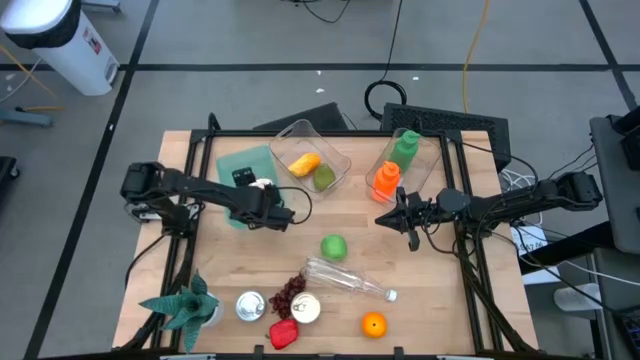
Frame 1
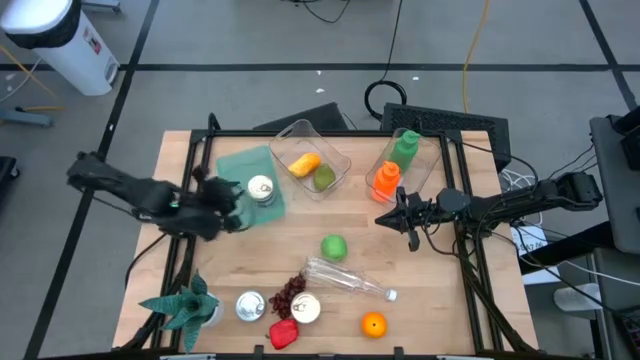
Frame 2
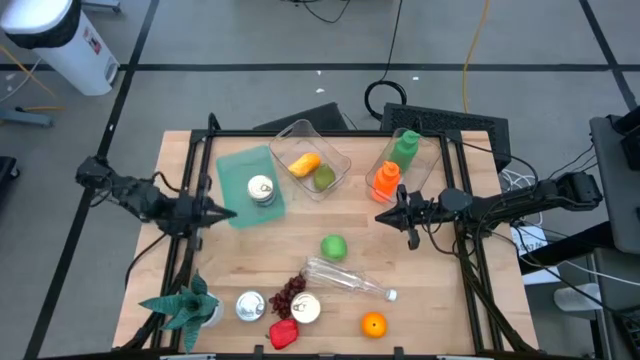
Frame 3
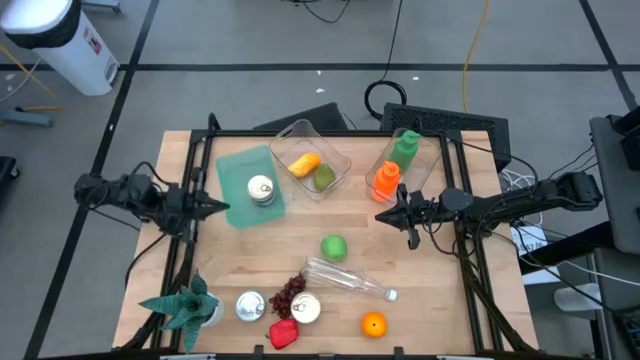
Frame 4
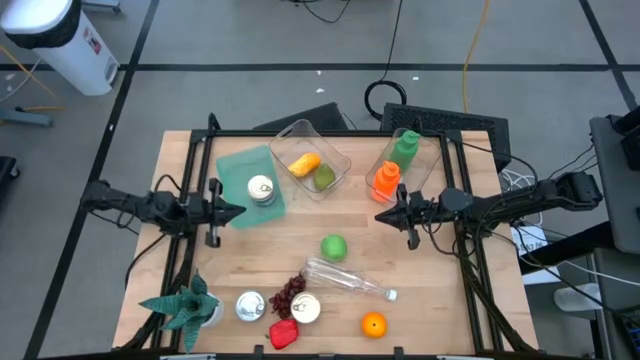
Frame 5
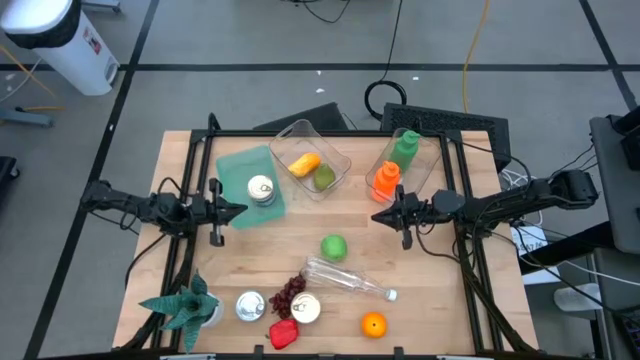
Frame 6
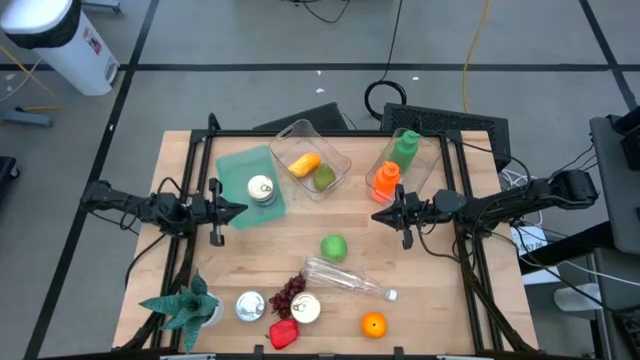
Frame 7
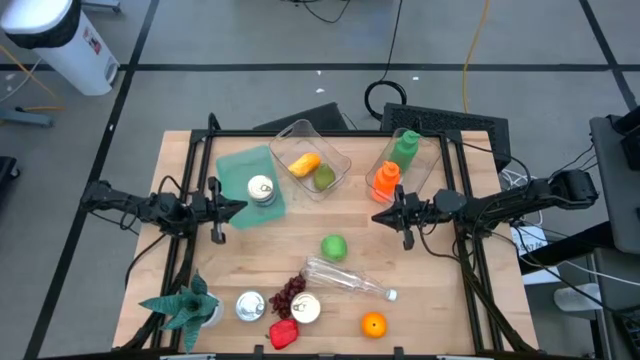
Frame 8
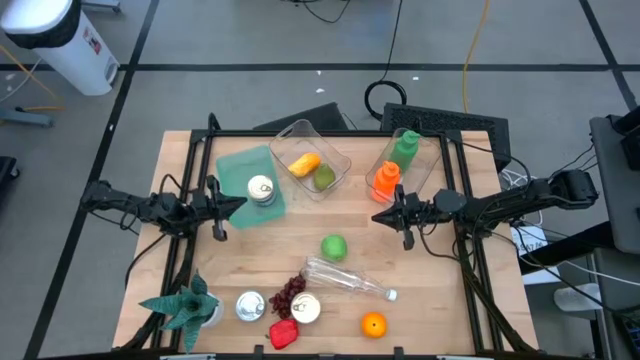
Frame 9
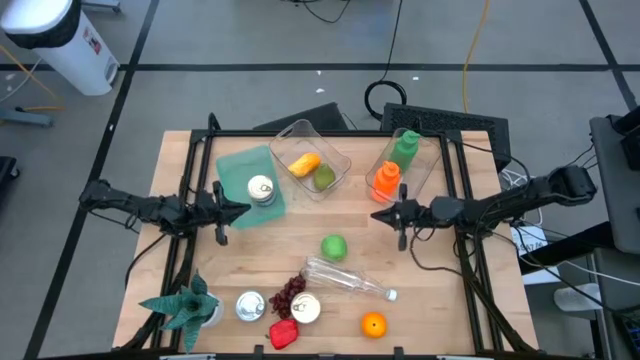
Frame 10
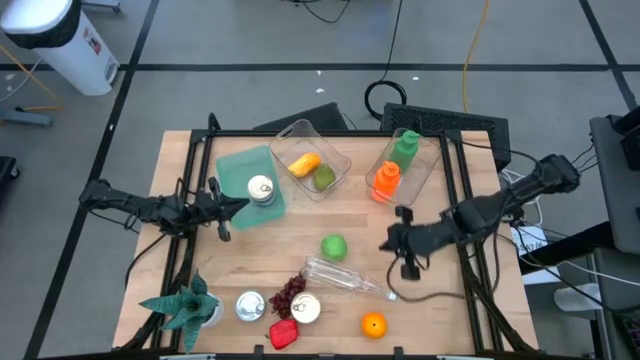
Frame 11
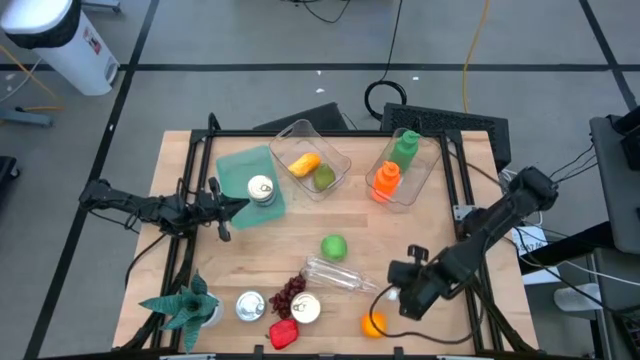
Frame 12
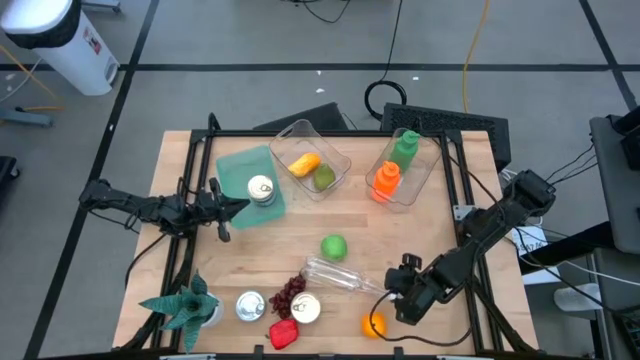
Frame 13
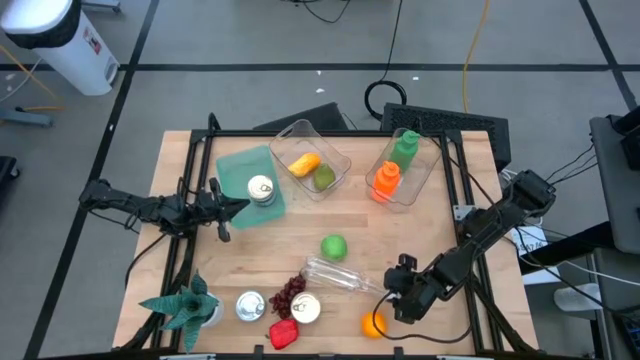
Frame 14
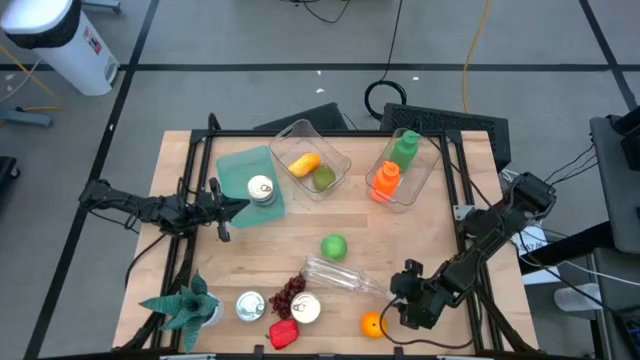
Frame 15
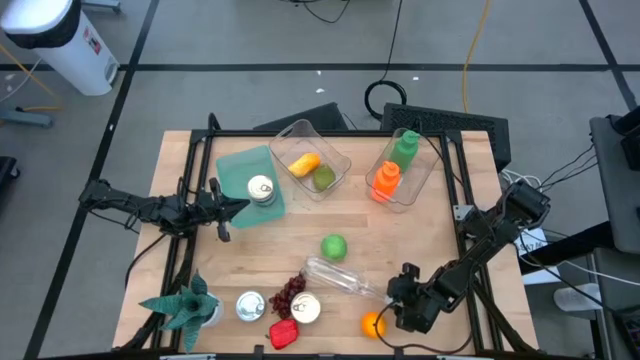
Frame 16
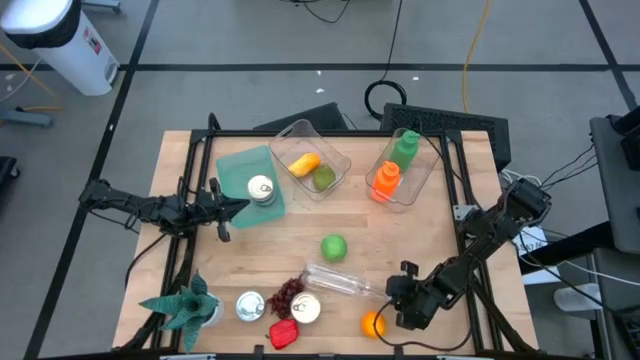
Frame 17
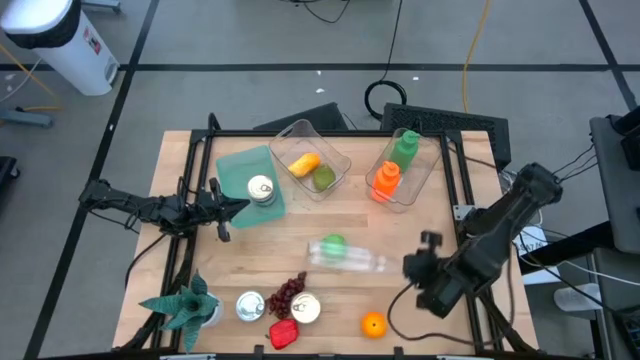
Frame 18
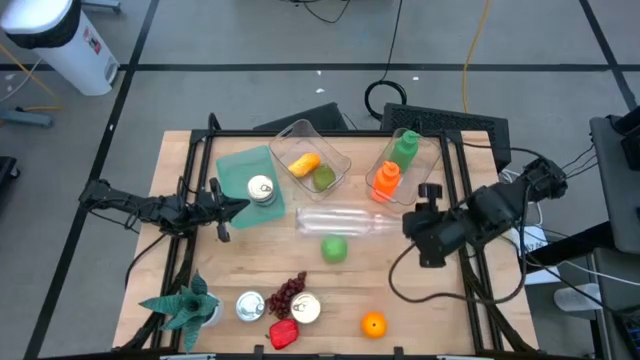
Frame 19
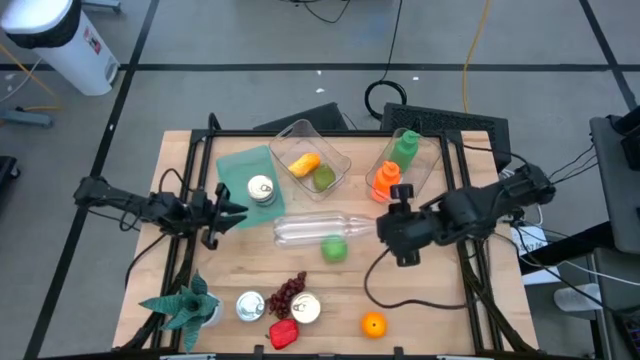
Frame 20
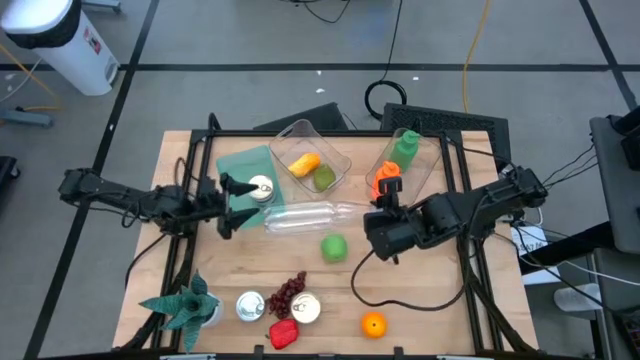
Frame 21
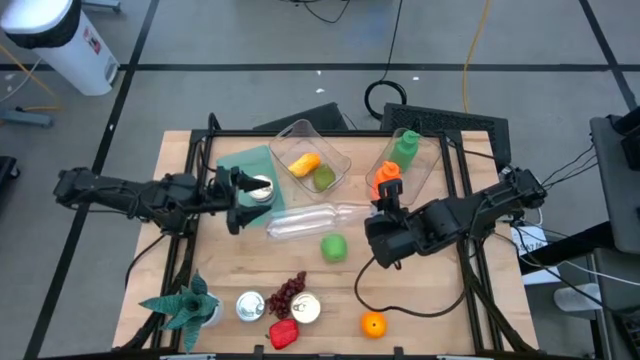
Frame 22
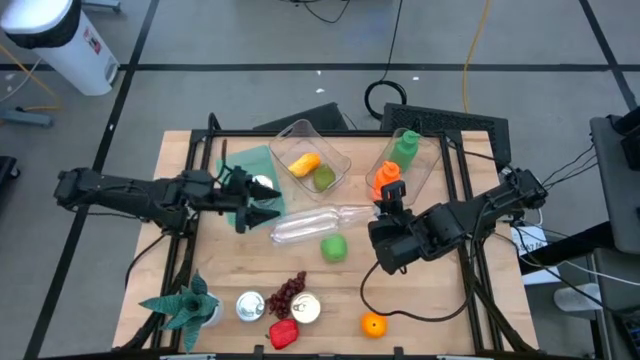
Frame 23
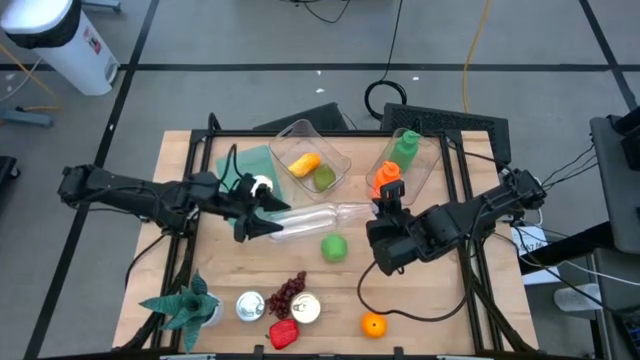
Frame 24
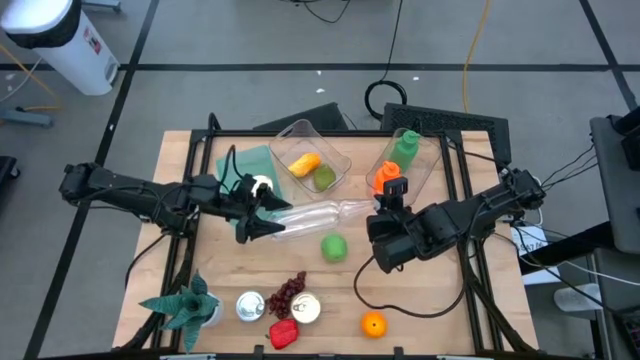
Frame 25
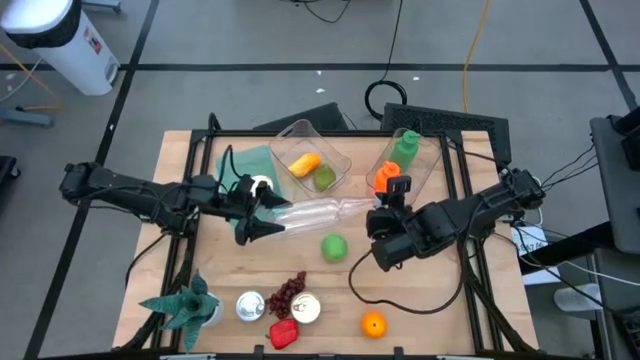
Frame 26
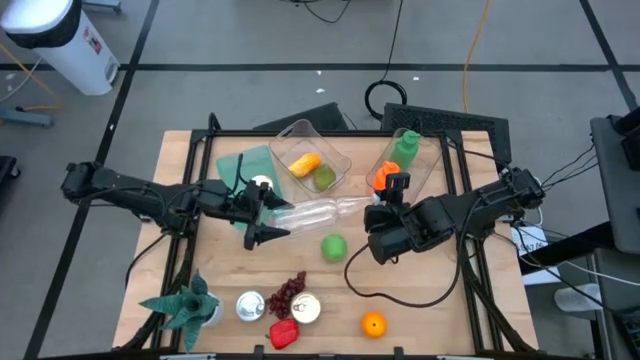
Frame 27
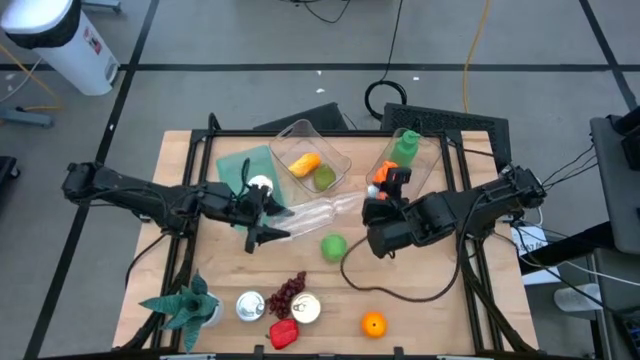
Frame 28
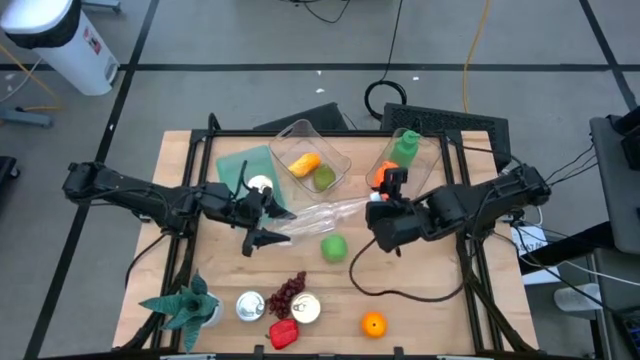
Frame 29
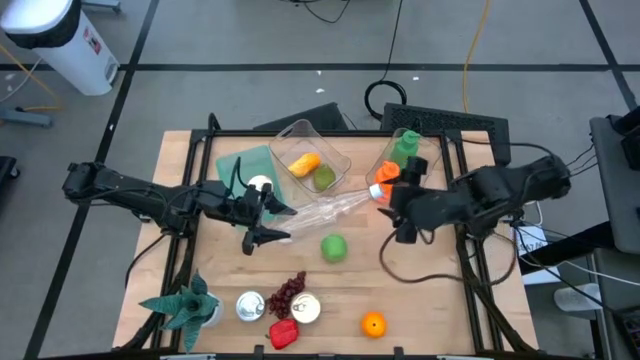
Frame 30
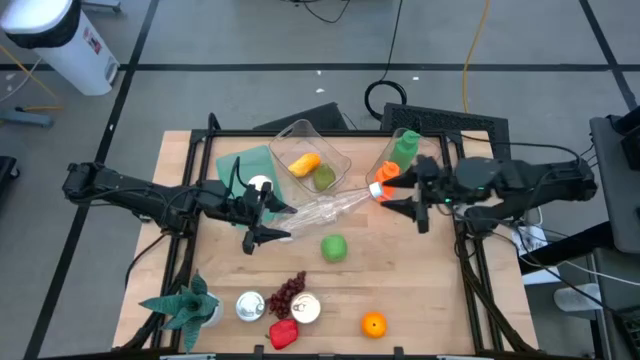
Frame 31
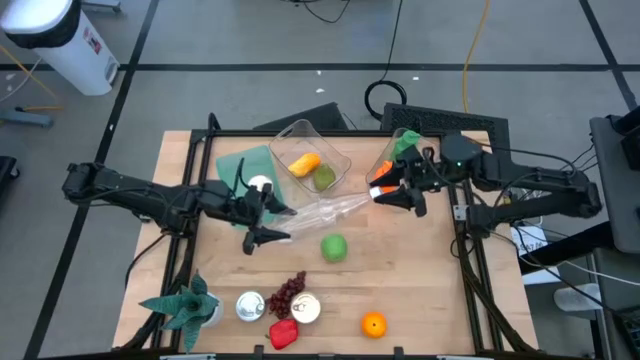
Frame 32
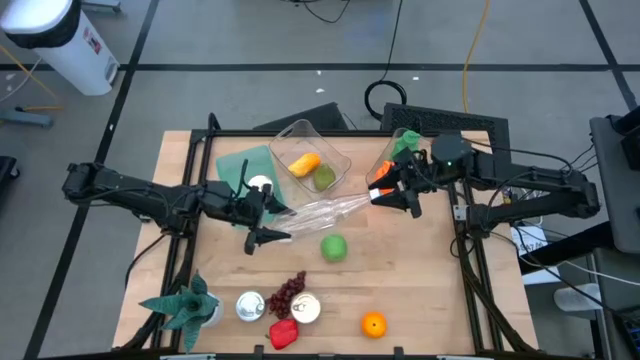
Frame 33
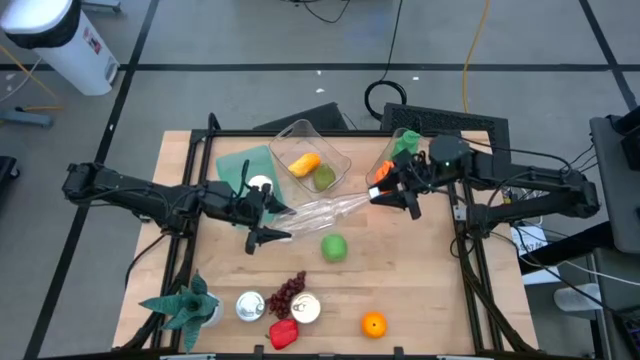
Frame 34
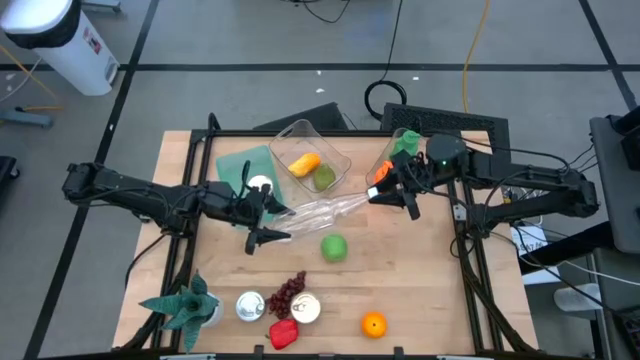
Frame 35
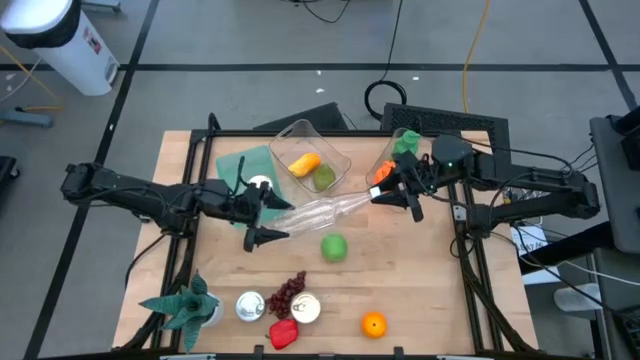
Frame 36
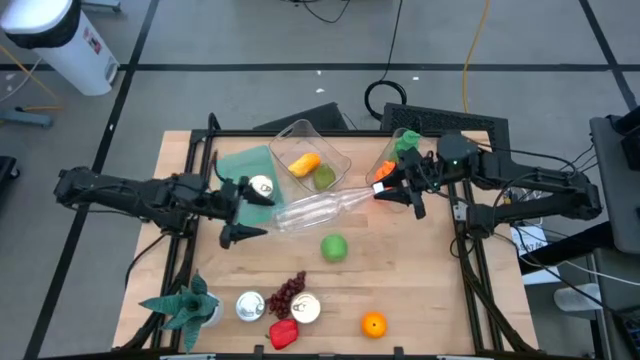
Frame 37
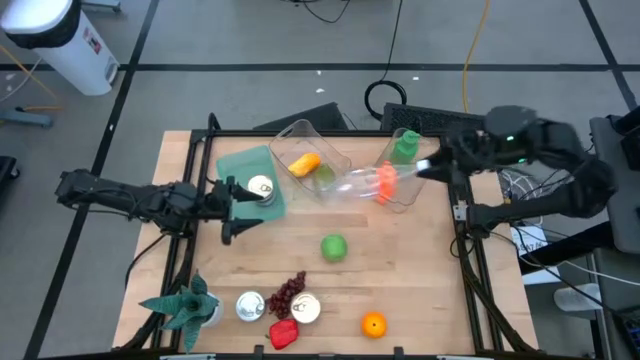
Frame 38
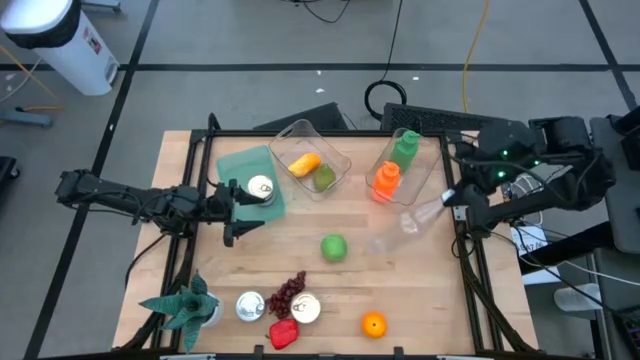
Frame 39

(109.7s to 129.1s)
Task: Pick & Place Food Item
Put the transparent bottle into the right transparent bin
